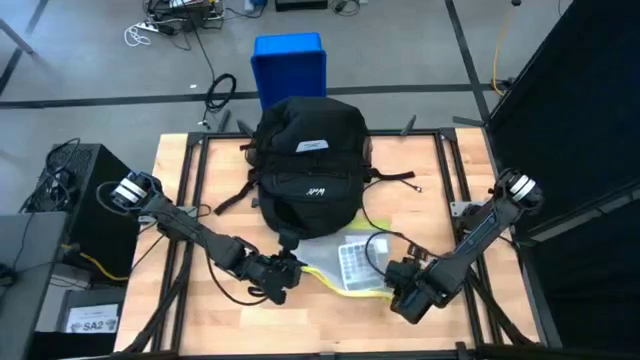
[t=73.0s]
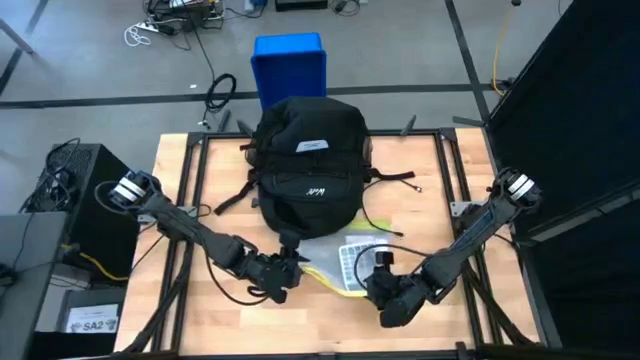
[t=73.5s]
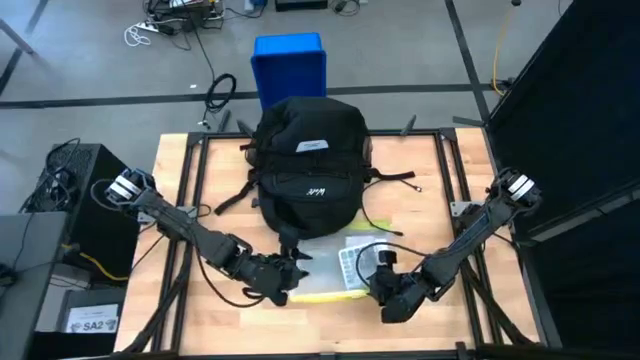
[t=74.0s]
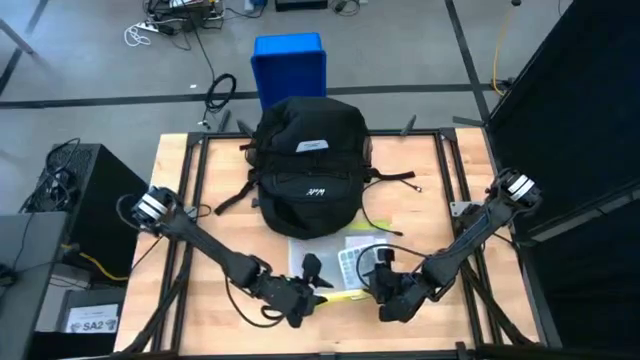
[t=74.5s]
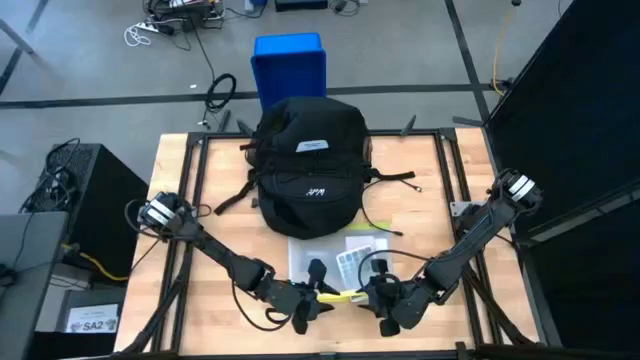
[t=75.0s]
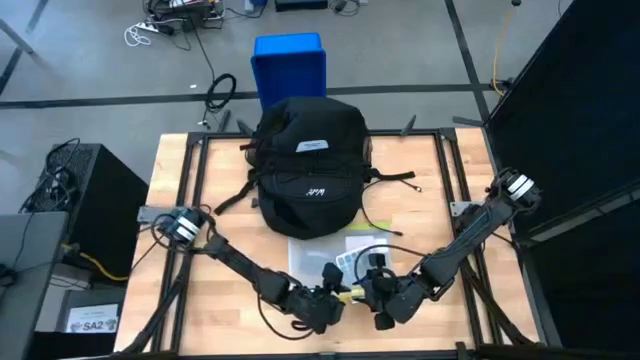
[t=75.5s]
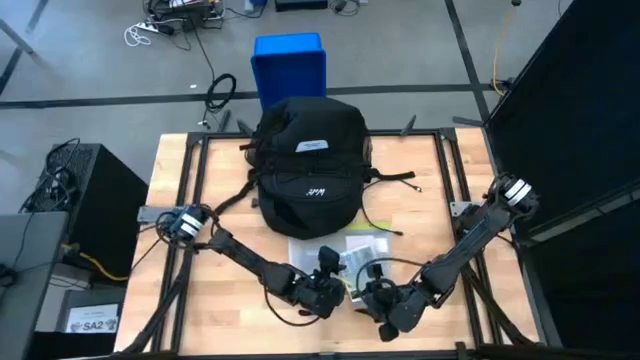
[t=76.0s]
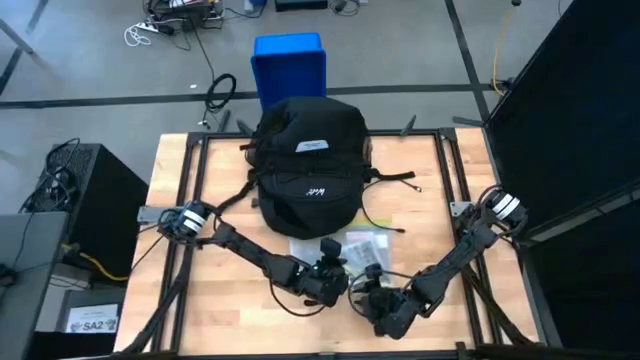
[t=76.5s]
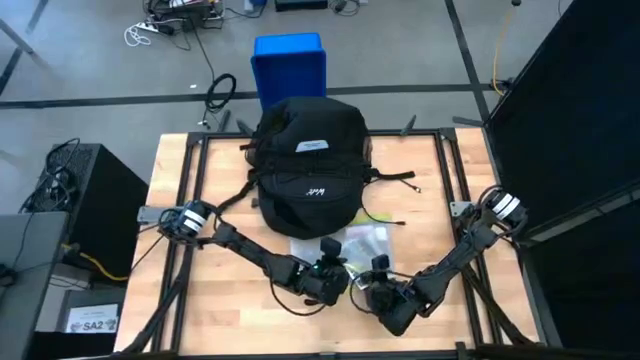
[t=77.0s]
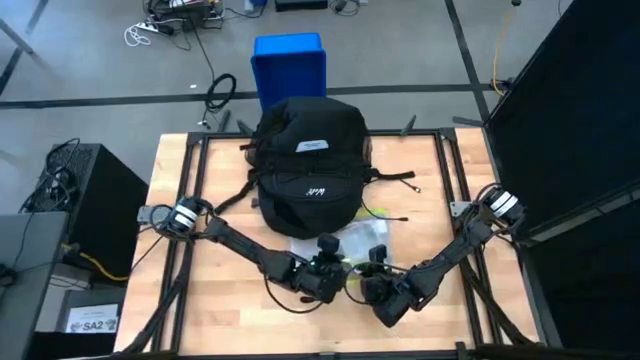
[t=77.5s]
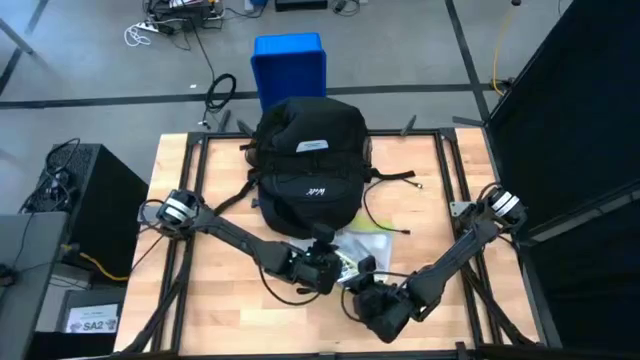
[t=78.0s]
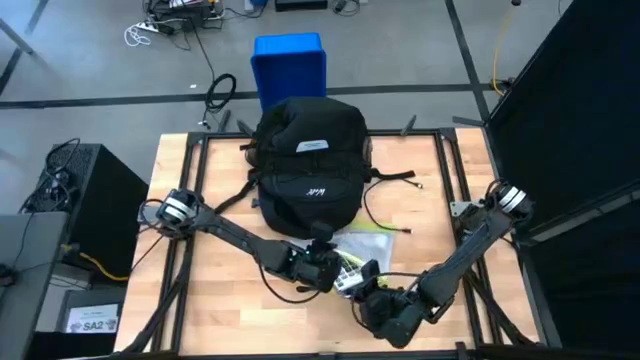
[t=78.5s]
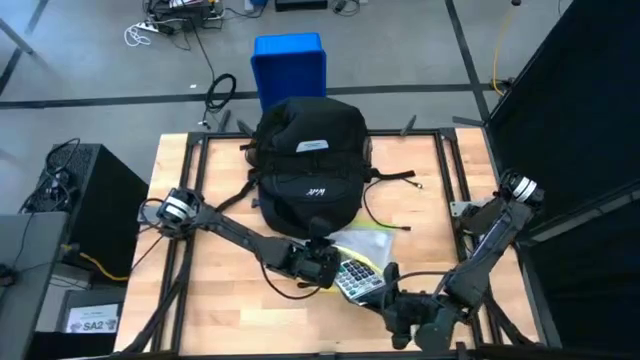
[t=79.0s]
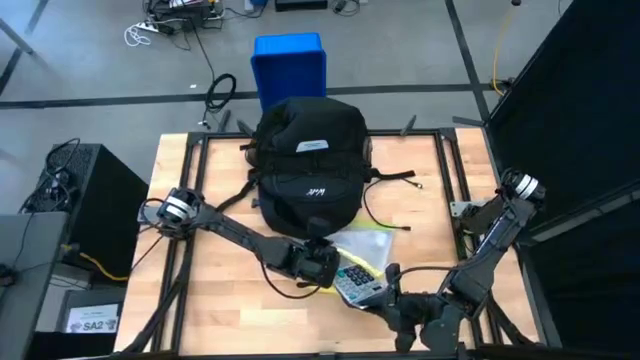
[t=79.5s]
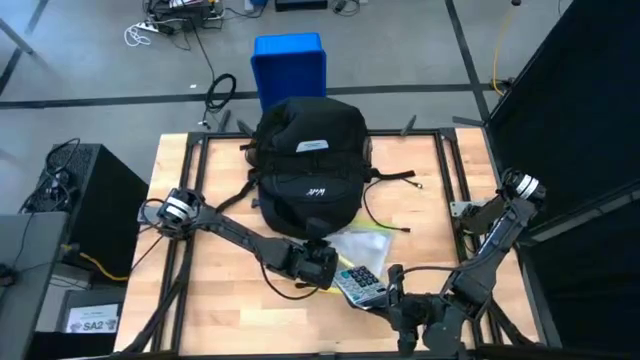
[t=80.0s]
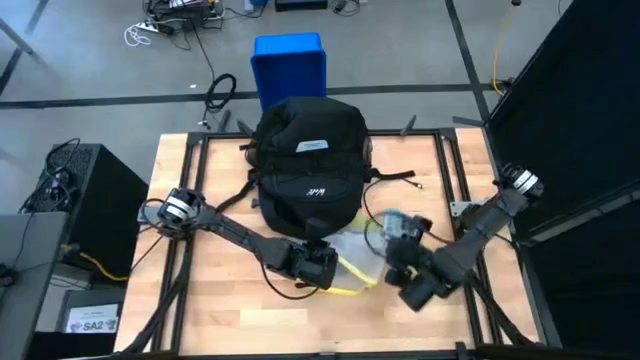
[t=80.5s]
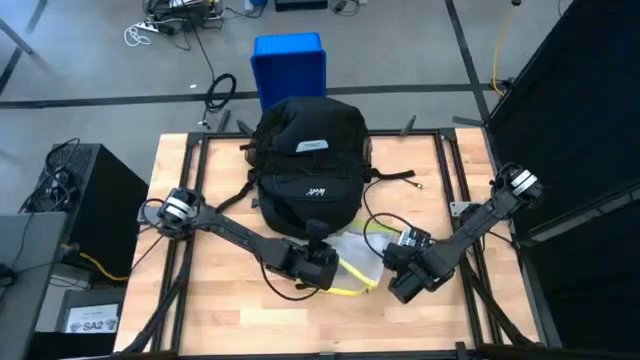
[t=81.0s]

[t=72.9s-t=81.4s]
Task: Unpack backpack
Remove the calculator from the zip bag

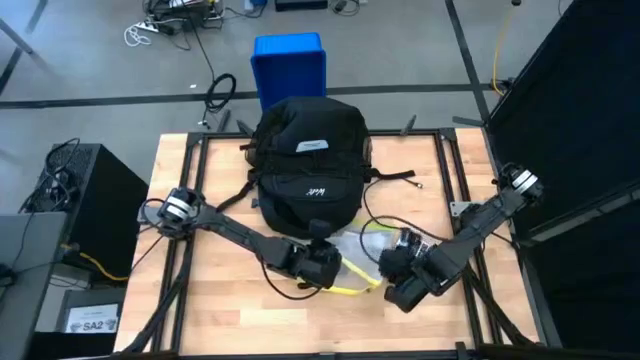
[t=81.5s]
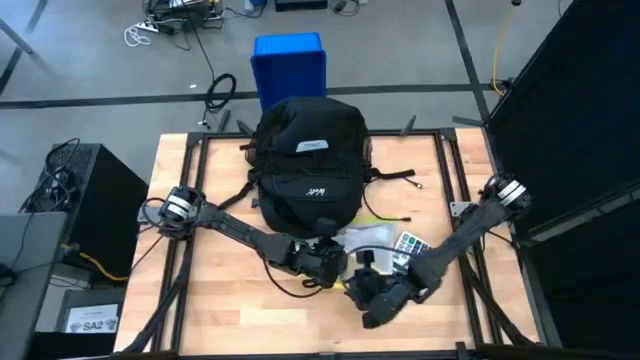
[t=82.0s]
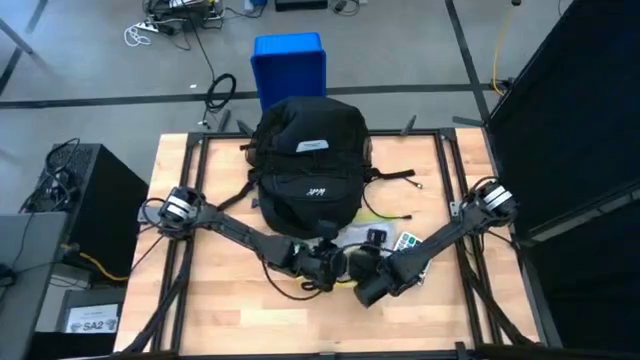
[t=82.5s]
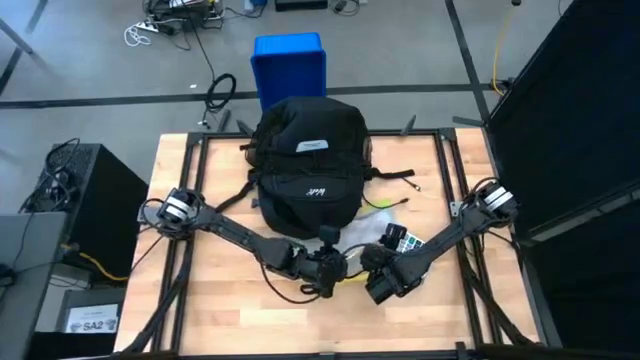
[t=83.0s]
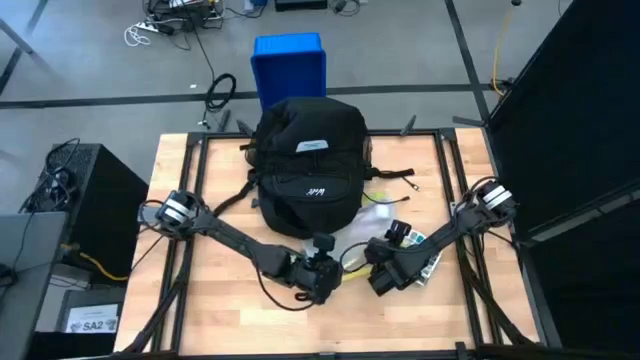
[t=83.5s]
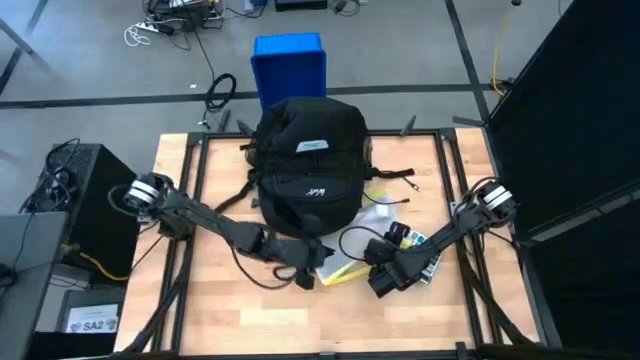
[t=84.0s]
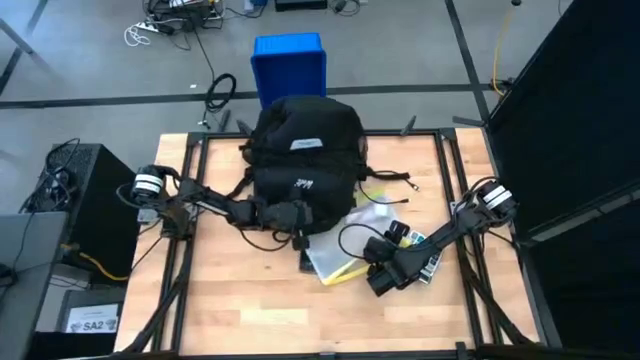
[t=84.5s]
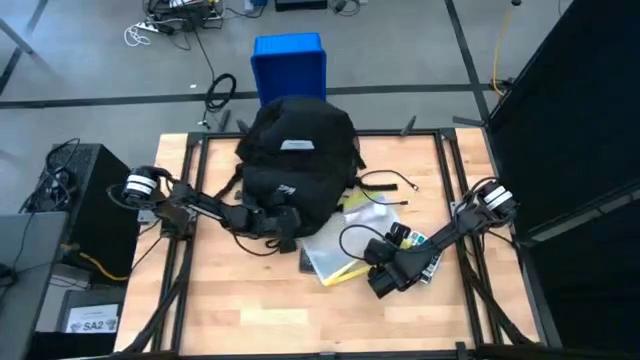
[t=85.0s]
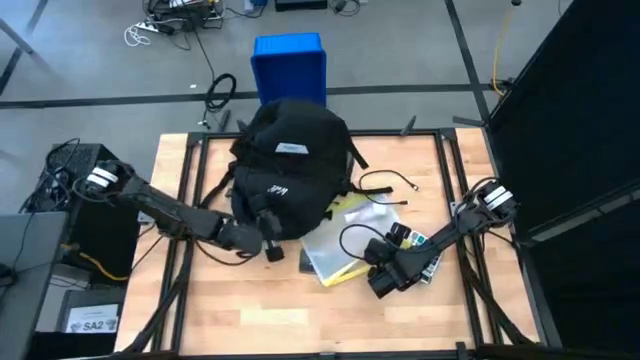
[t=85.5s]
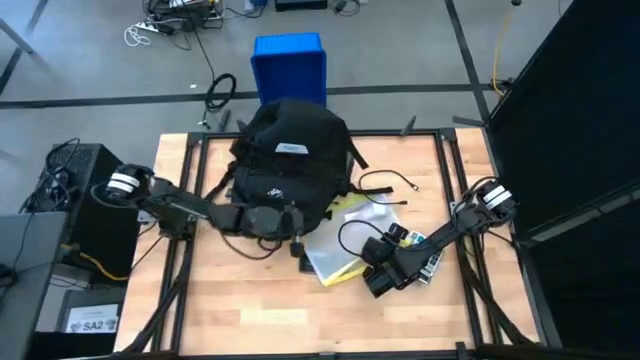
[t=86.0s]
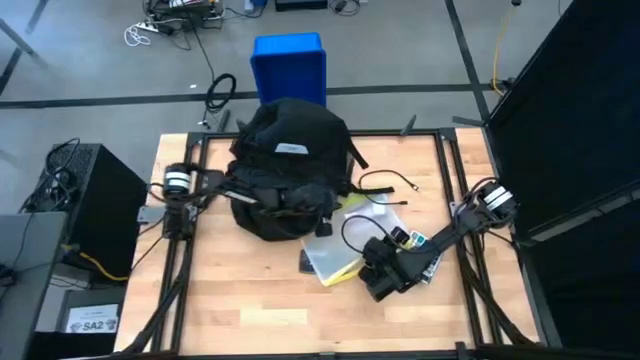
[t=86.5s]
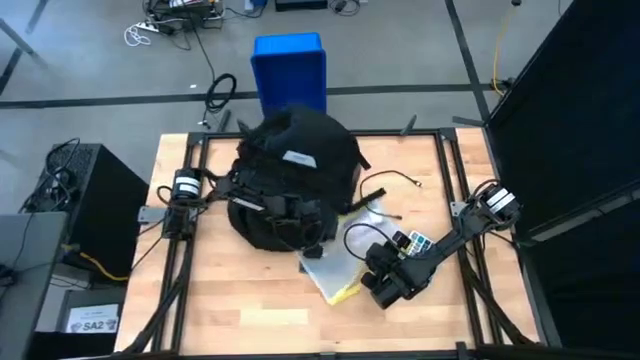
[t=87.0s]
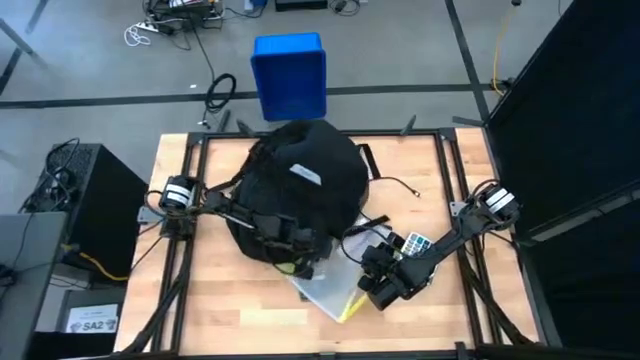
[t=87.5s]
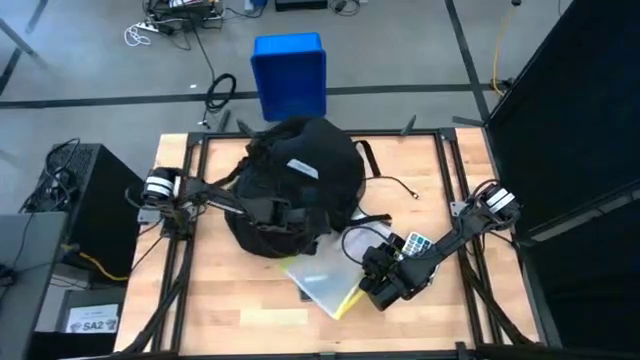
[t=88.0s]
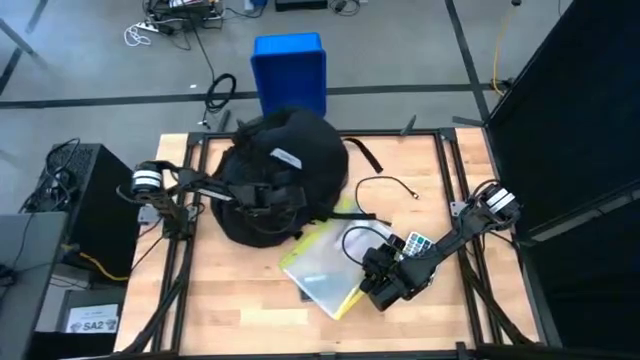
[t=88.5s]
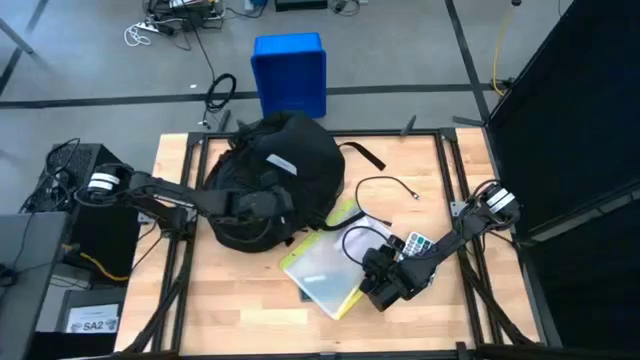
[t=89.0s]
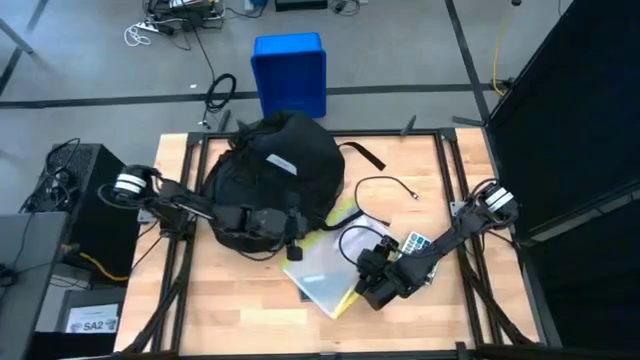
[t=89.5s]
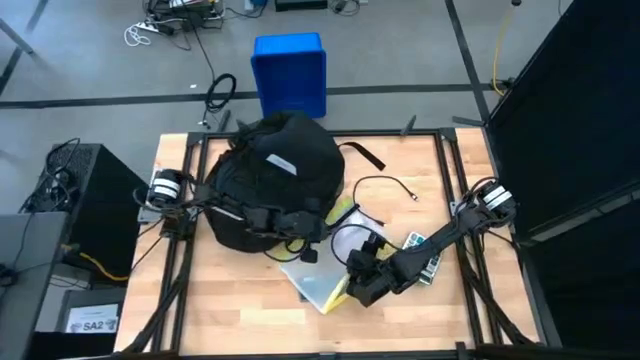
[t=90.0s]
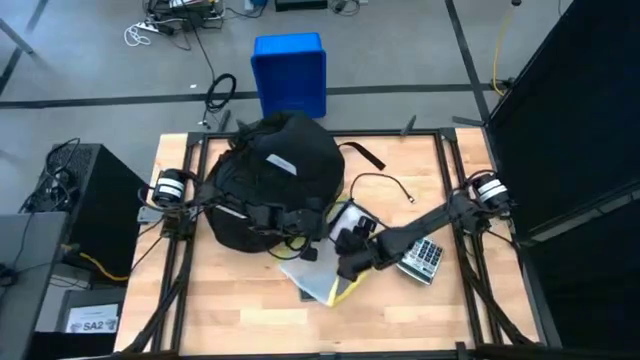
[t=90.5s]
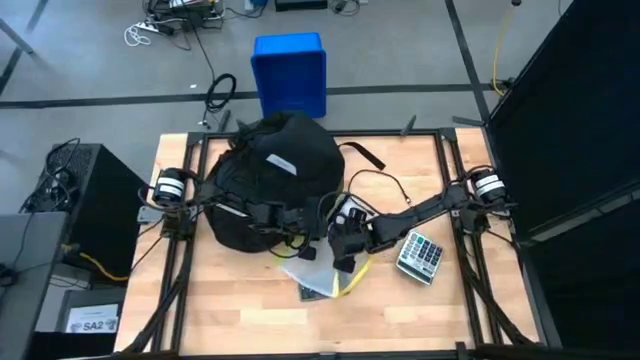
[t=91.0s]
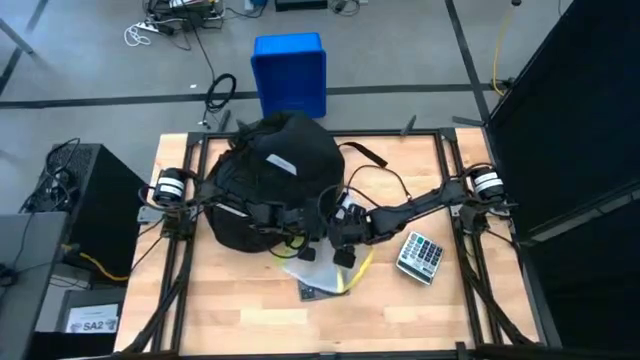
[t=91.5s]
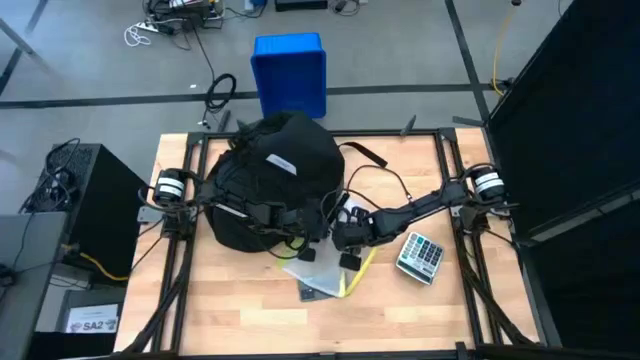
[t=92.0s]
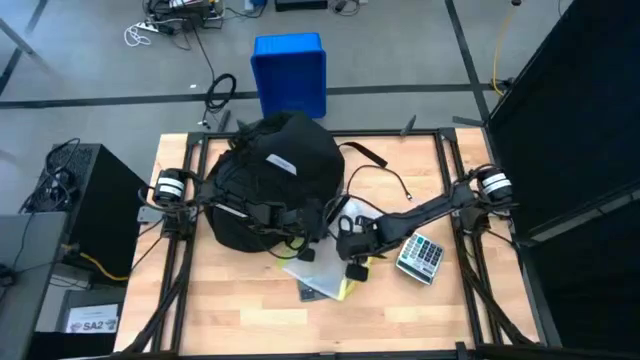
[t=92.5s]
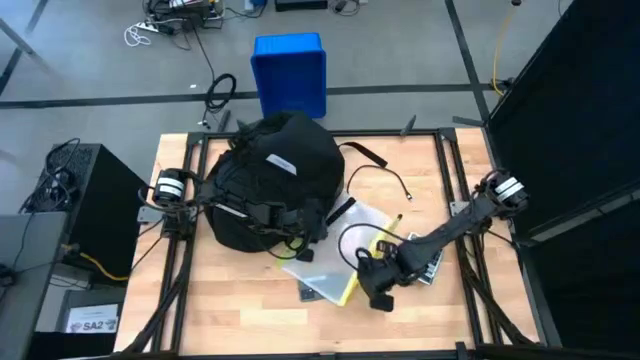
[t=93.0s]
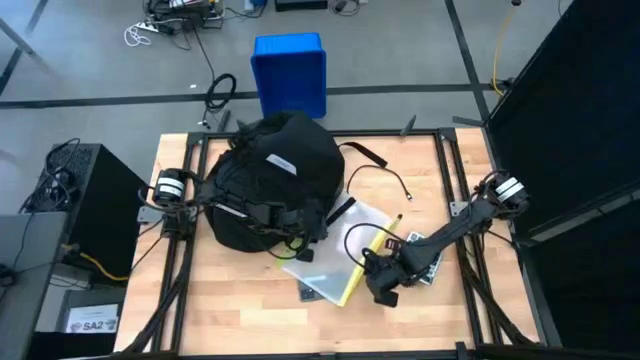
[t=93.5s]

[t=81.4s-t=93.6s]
Remove the pen from the zip bag
